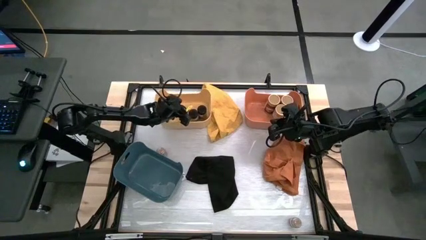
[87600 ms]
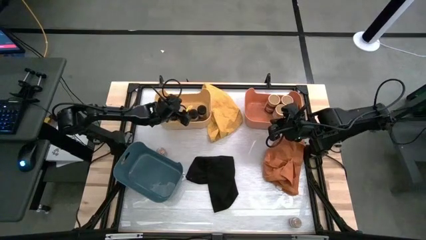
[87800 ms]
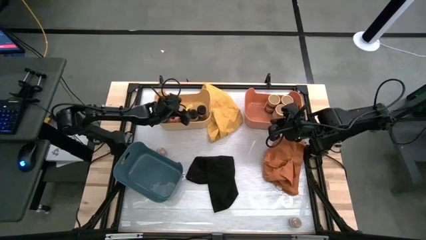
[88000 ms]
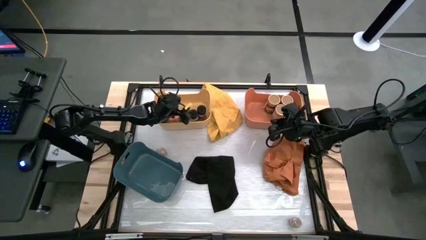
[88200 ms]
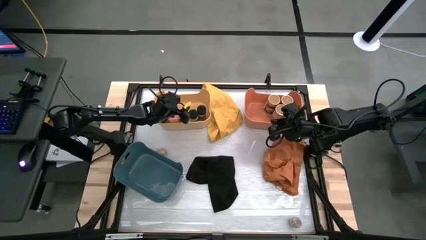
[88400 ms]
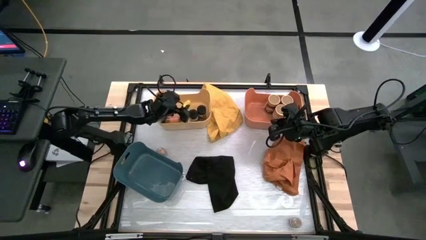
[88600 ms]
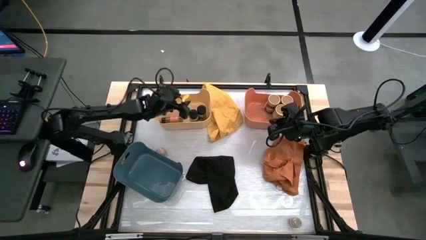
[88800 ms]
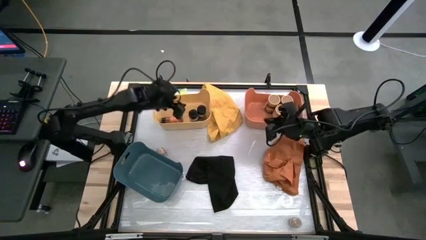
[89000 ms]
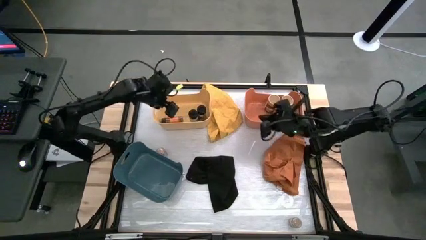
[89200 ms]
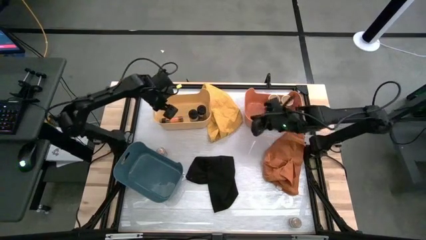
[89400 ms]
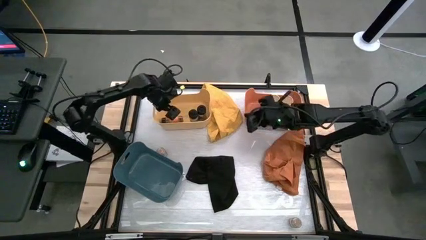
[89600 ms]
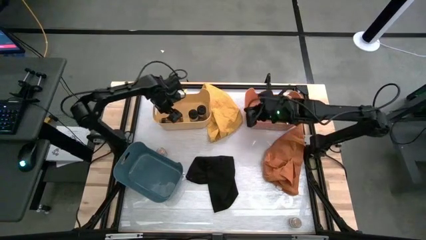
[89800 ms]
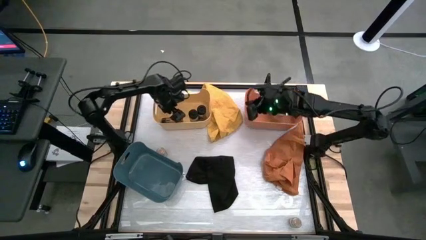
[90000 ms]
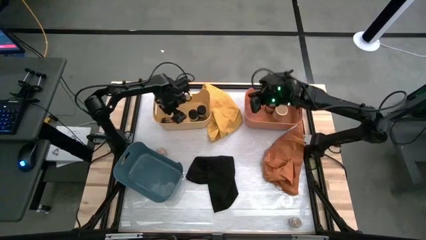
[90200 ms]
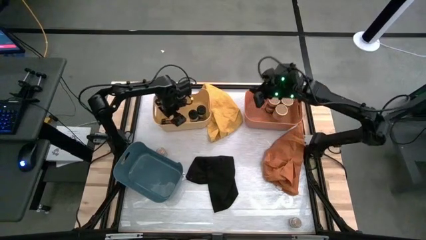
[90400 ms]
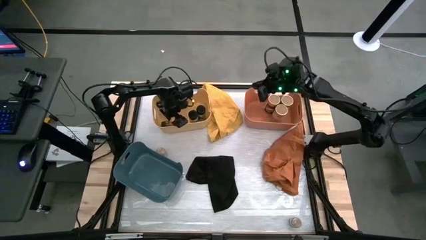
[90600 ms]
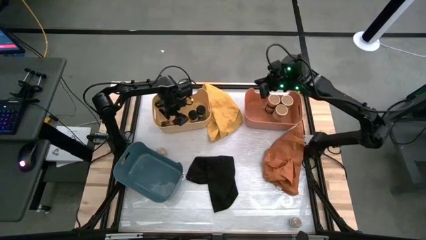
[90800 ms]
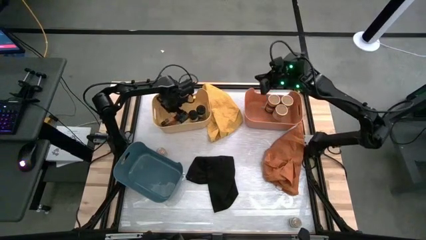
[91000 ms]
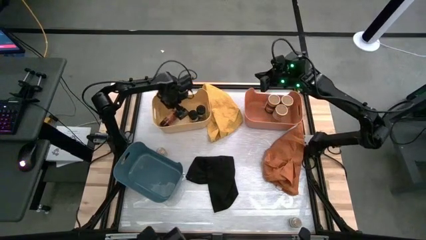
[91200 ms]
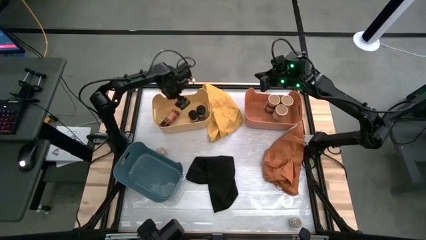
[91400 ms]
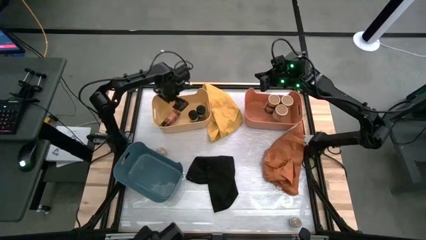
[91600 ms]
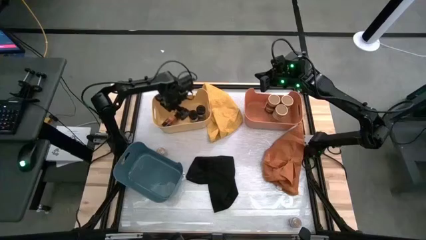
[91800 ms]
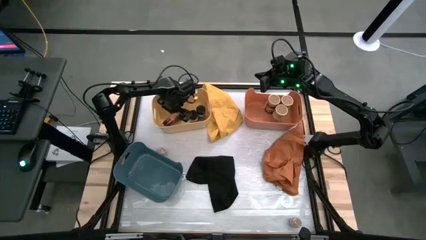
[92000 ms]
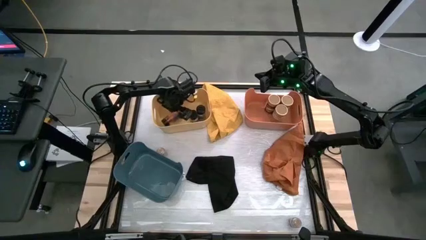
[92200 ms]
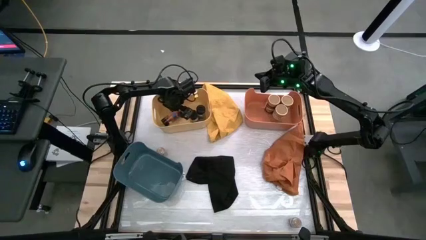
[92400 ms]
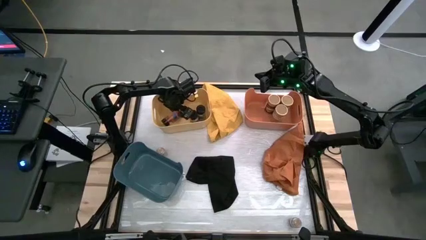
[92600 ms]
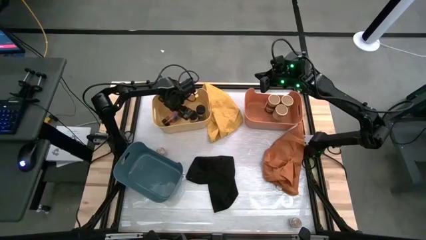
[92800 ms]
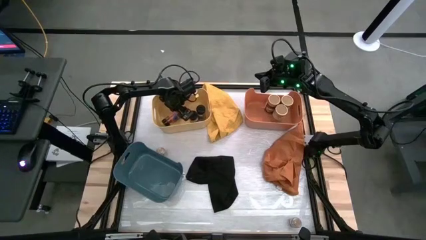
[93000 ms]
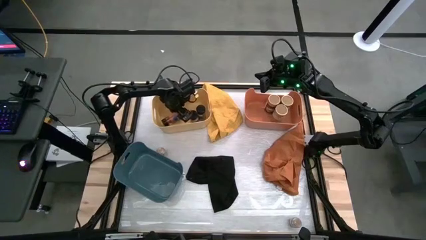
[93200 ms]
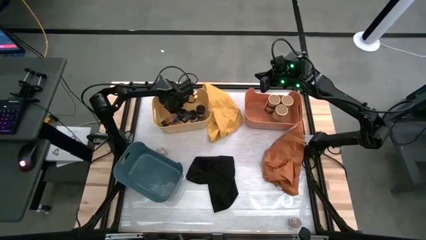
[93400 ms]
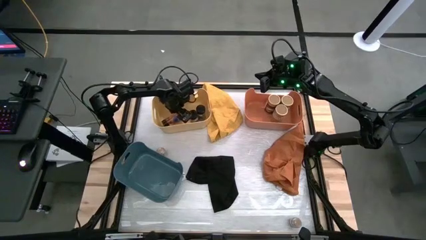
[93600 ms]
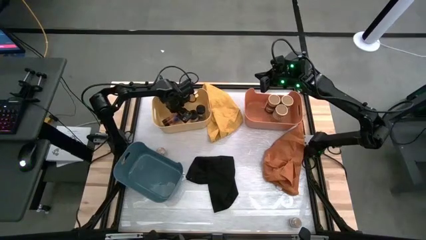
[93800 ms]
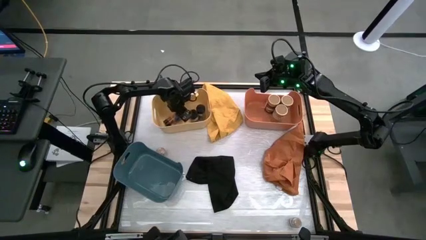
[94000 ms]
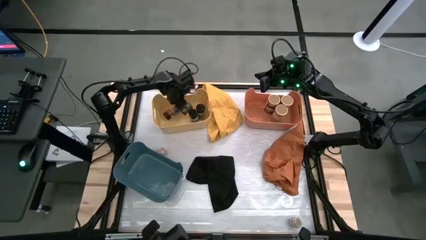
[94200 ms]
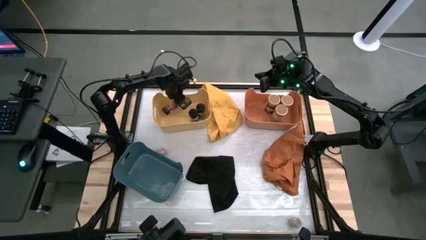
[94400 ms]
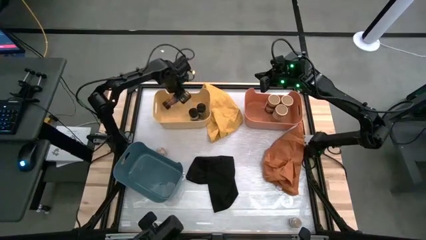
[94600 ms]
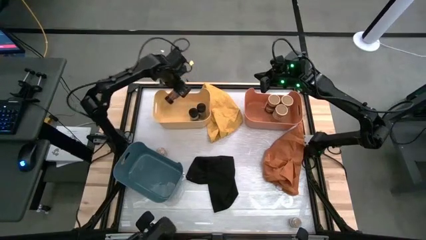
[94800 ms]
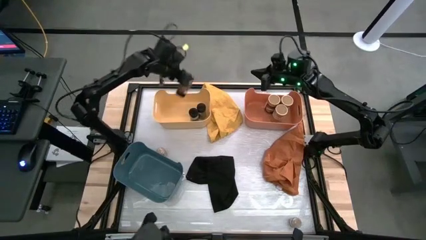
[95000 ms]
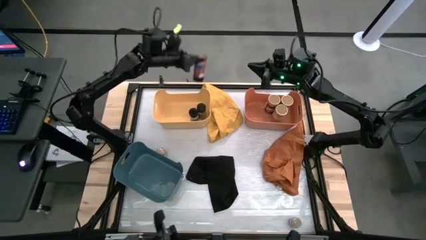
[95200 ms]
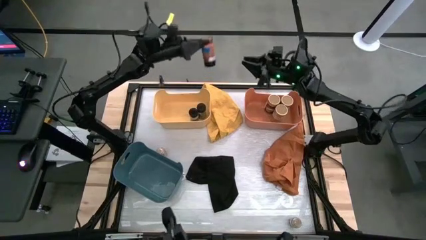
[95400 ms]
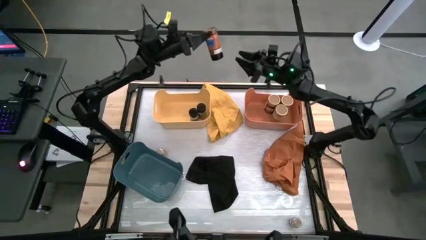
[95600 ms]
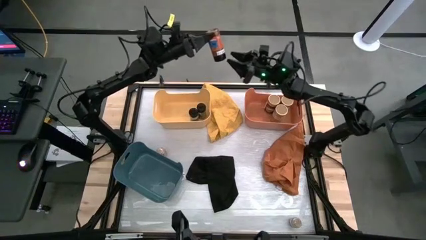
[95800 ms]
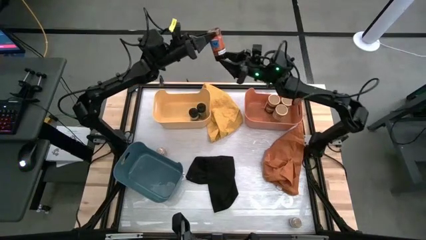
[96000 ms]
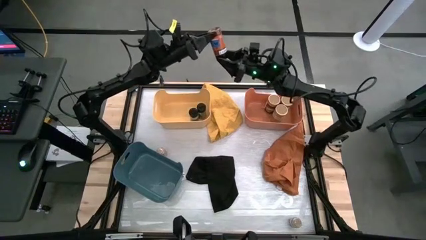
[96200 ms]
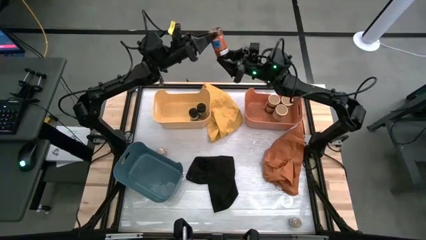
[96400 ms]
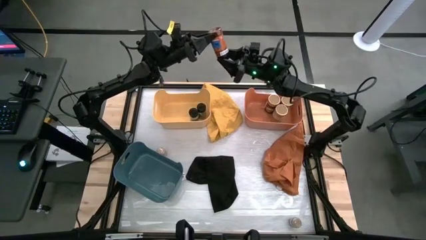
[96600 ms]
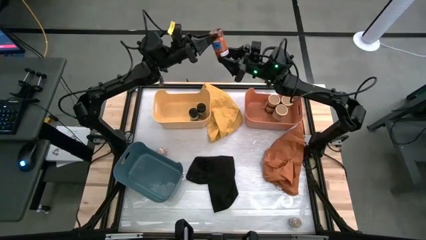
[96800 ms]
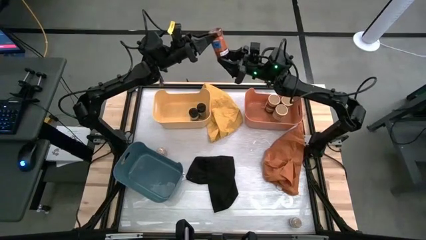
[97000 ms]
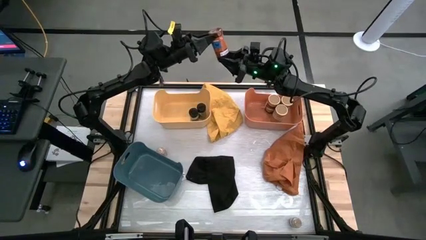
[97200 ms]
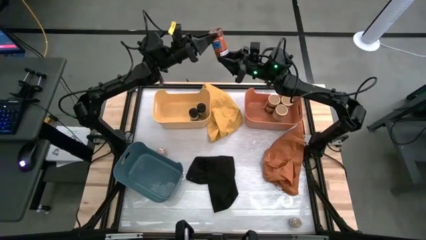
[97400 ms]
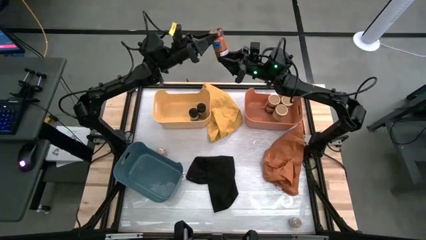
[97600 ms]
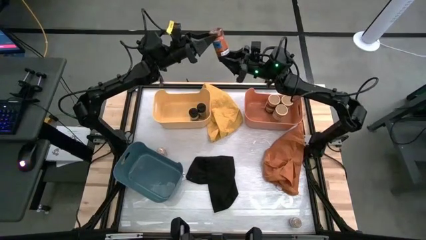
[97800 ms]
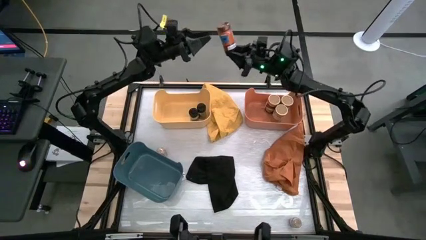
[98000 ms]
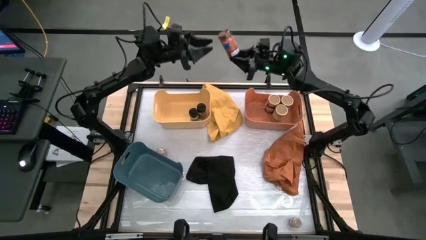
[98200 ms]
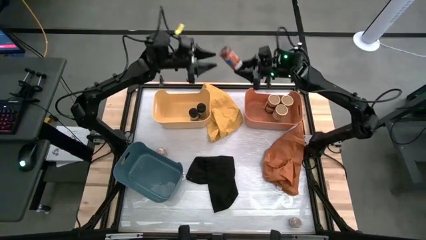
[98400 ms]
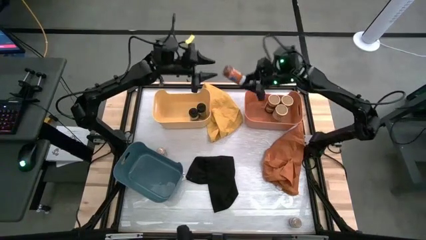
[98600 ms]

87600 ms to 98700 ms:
Task: Sort spices by type
Put the black spice bottle into the yellow bin
